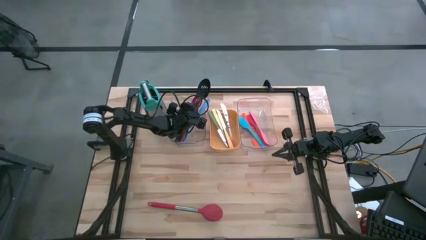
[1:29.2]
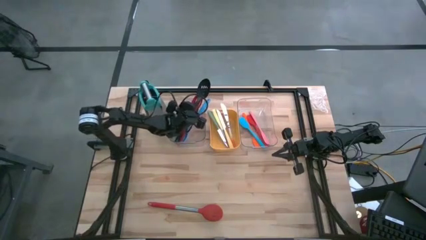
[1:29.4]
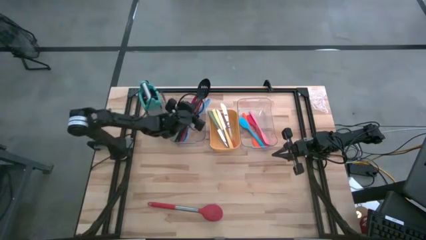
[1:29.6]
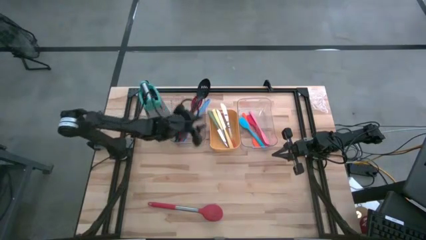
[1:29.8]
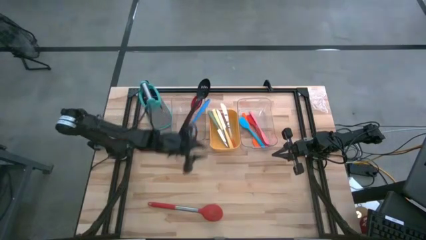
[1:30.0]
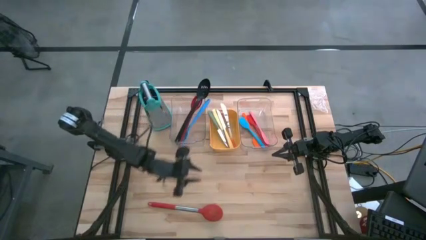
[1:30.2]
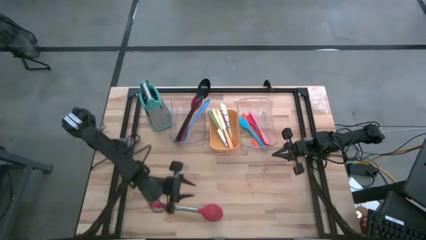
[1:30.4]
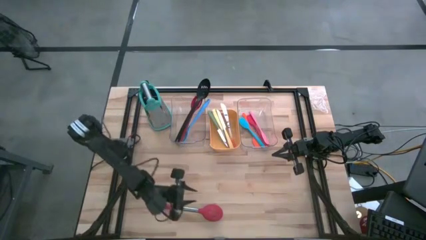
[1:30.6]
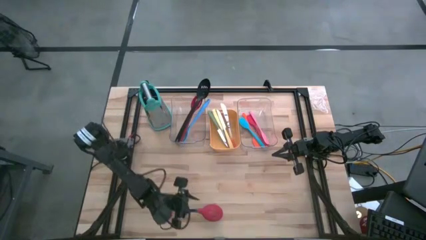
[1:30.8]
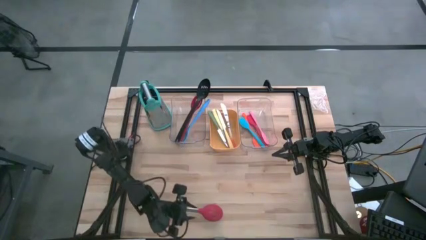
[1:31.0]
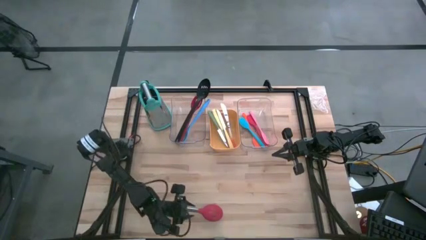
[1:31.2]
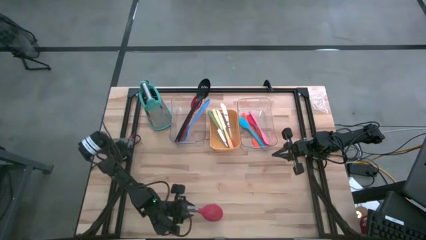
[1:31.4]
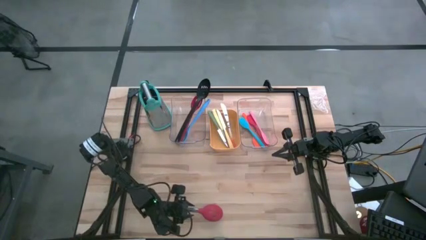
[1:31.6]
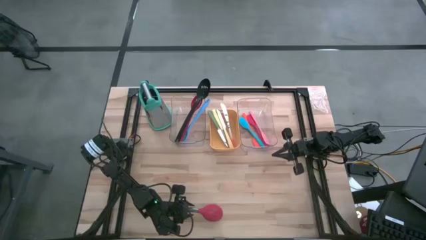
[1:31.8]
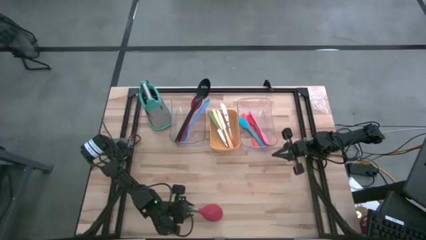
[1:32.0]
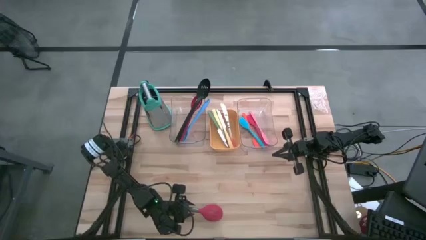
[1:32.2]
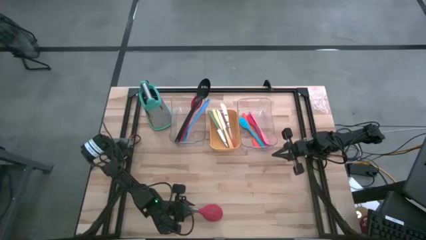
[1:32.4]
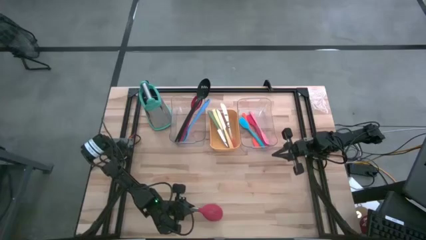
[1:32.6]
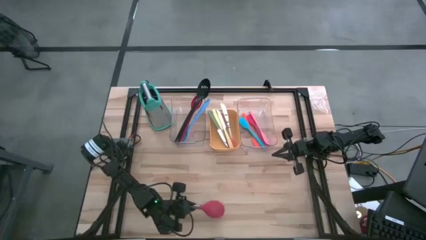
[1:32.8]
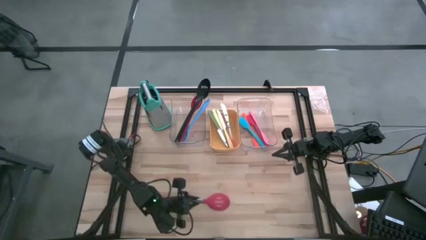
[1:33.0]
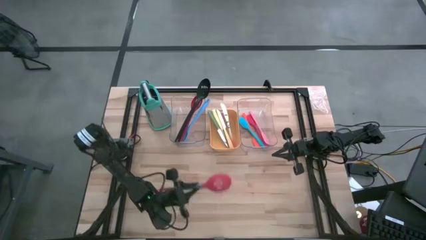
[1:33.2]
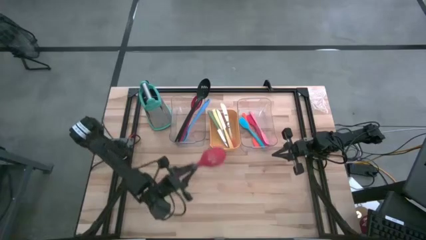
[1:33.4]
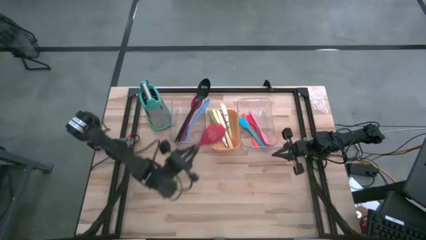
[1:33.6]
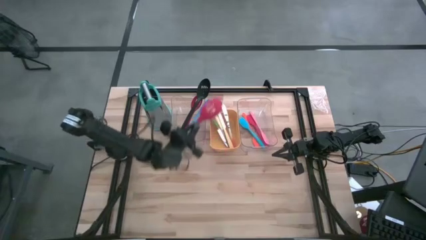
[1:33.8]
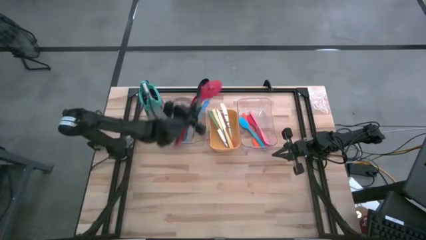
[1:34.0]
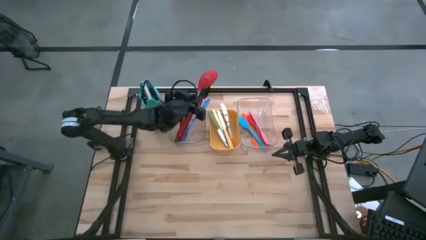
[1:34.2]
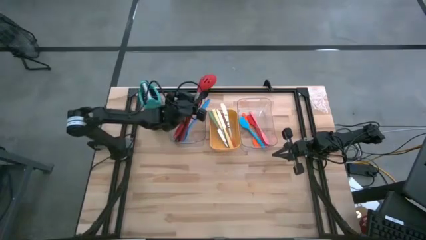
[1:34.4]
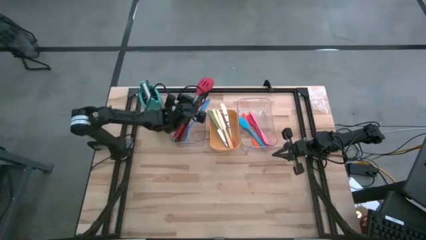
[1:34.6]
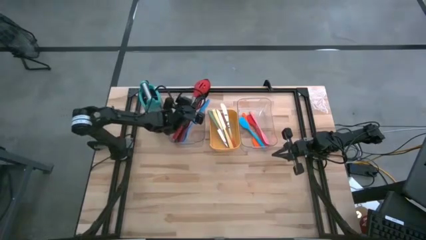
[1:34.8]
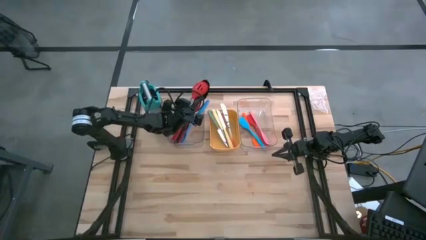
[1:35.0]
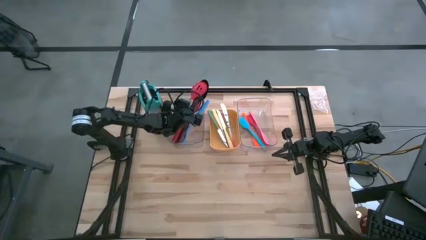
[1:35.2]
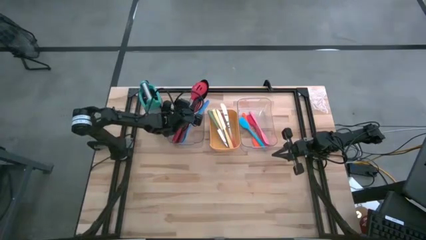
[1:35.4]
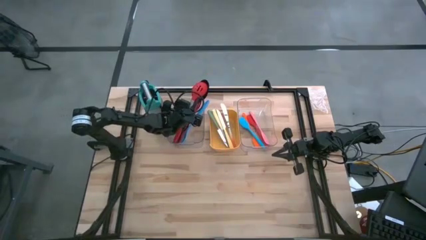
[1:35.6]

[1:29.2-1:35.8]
Task: Pick & Place Kitchen Items
Put the red serving spoon into the left transparent bin

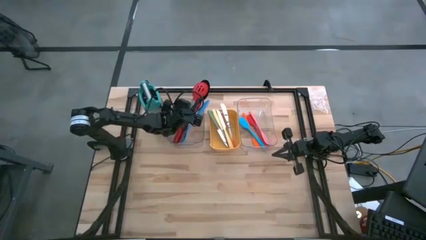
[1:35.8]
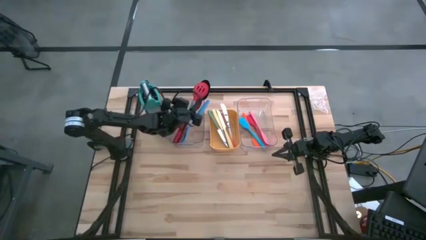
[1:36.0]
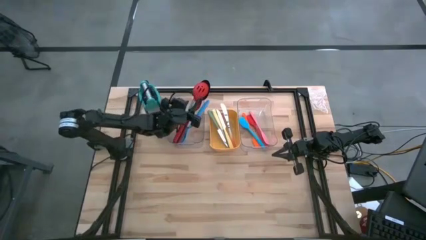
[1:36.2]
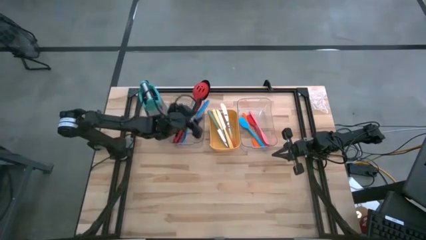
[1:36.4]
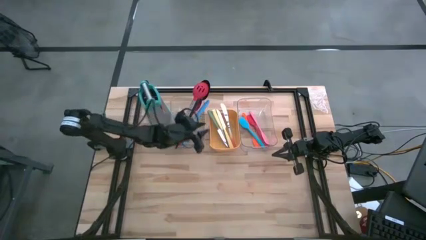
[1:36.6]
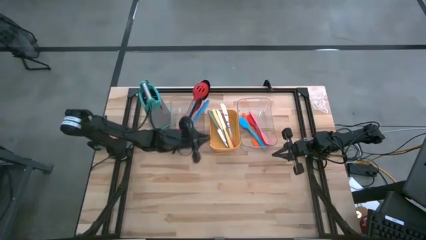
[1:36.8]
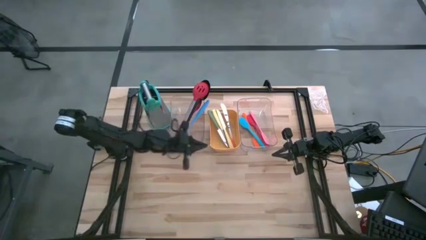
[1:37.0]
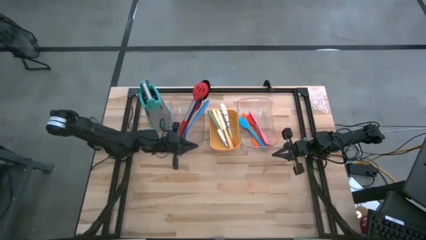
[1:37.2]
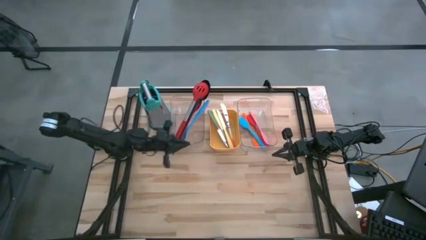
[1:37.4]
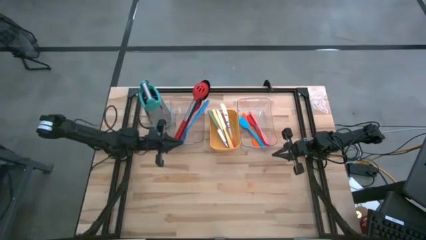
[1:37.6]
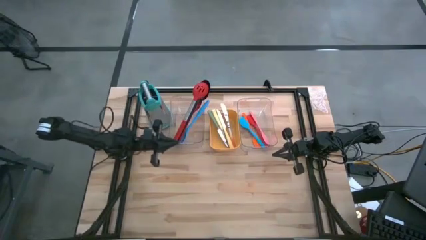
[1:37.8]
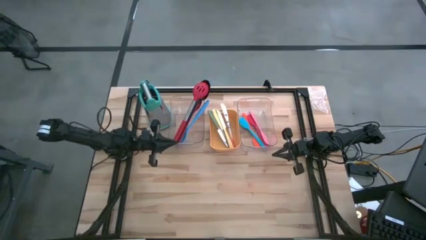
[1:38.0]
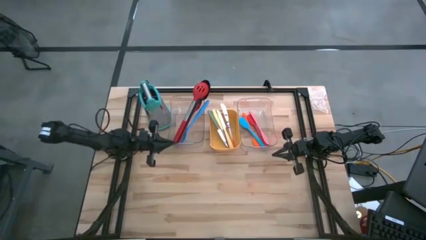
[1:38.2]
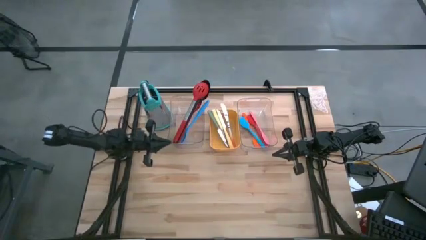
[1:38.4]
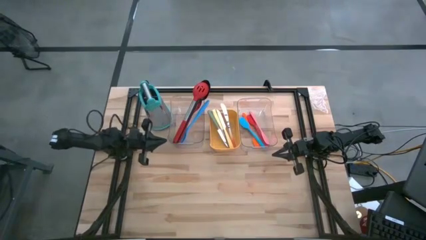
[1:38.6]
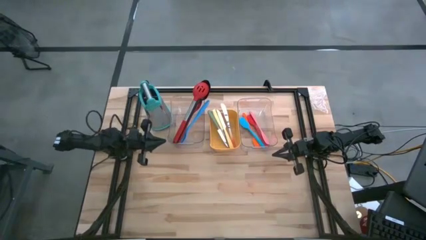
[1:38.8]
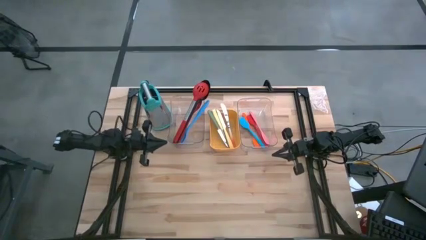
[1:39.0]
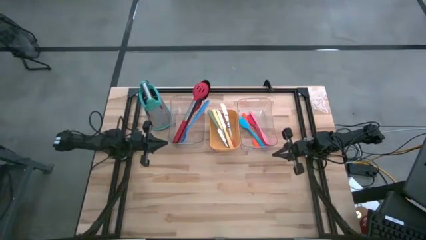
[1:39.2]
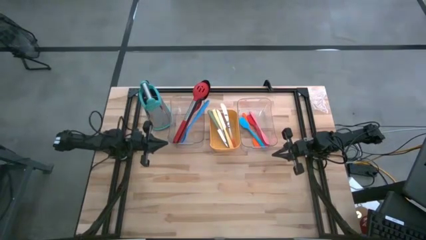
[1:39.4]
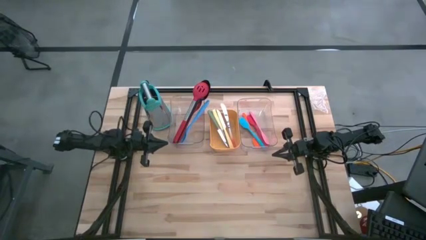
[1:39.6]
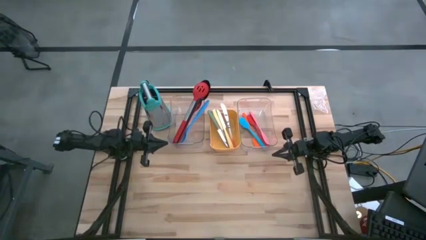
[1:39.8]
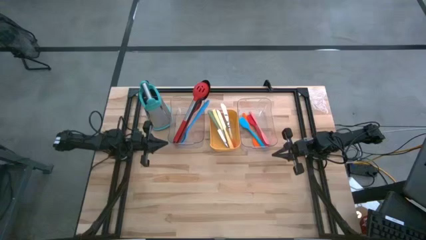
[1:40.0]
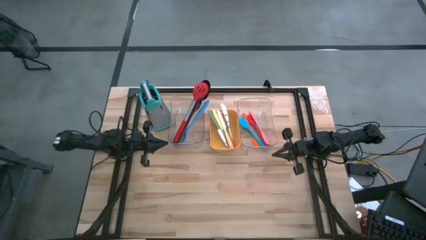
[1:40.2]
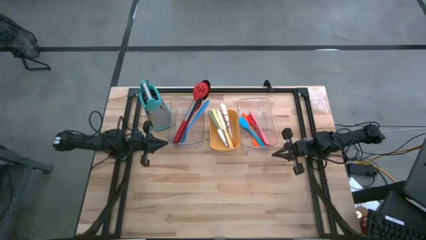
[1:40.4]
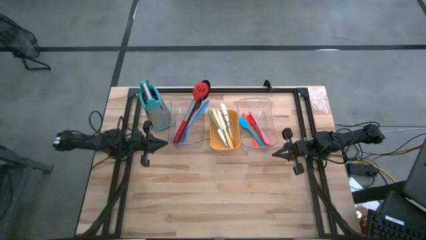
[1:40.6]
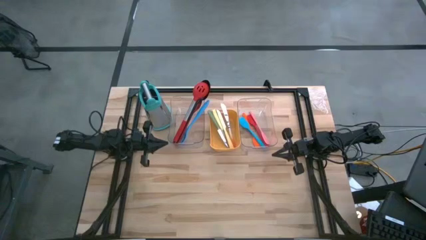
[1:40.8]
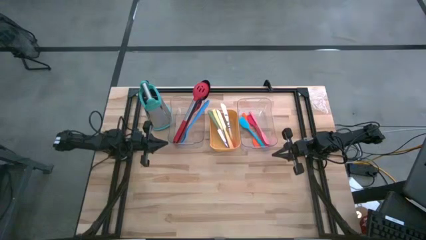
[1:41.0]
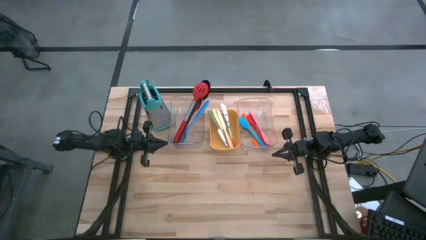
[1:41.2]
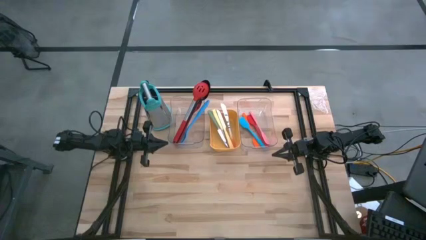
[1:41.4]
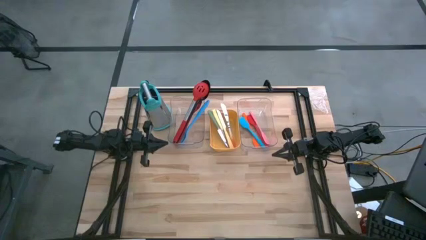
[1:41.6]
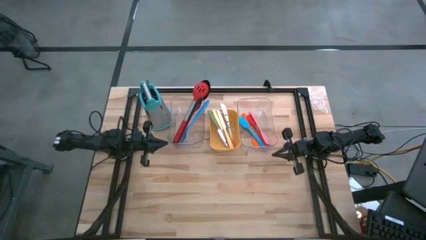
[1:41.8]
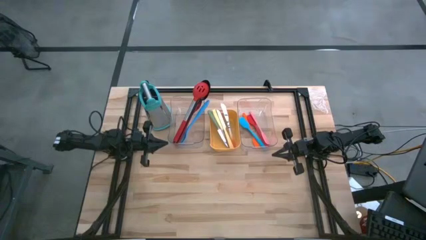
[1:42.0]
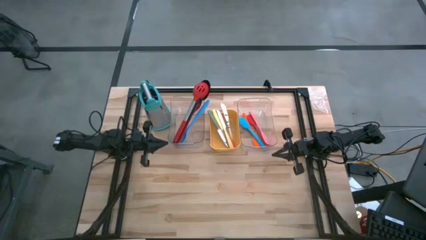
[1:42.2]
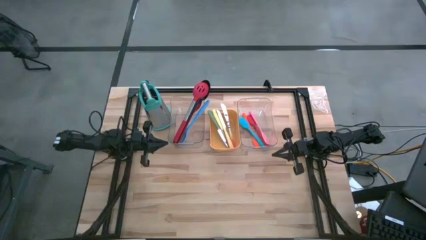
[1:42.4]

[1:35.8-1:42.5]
Return to Home Position

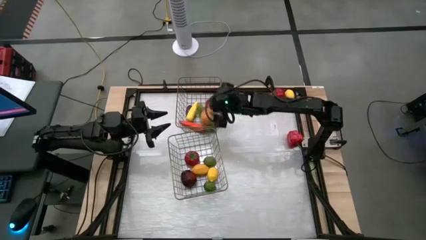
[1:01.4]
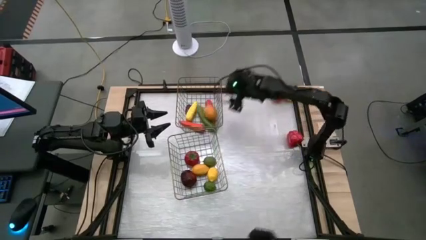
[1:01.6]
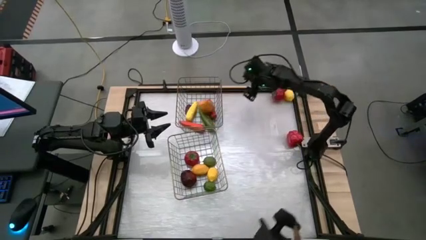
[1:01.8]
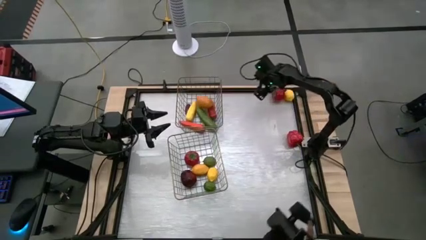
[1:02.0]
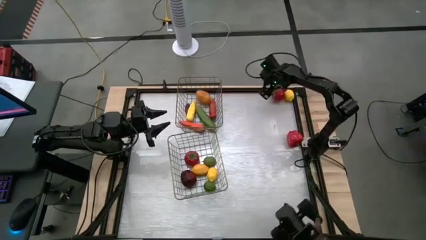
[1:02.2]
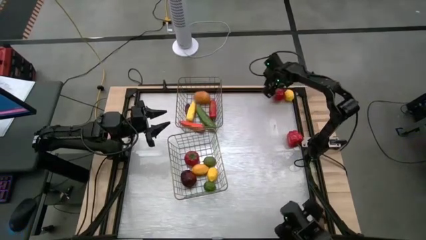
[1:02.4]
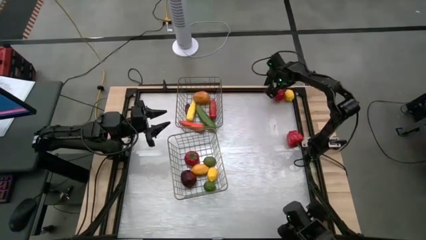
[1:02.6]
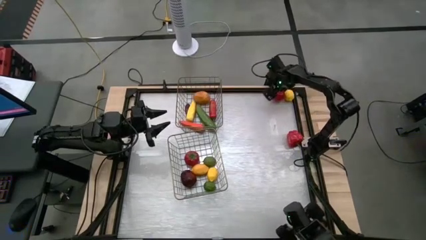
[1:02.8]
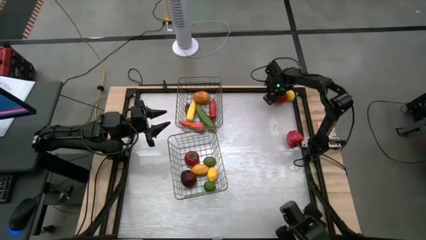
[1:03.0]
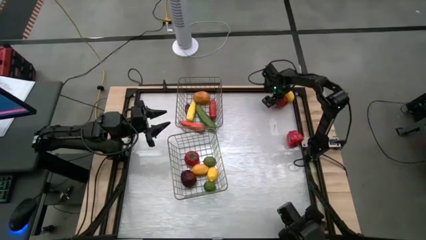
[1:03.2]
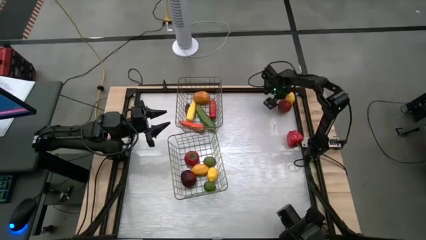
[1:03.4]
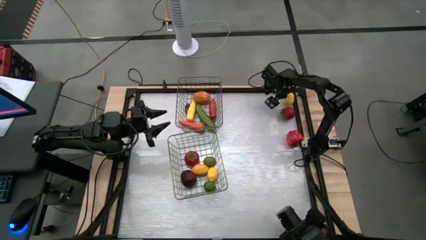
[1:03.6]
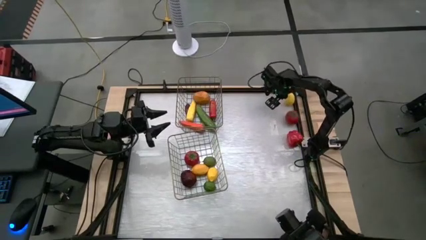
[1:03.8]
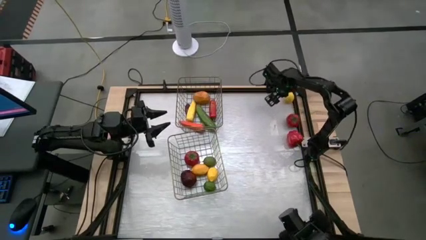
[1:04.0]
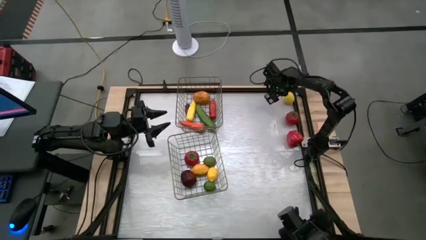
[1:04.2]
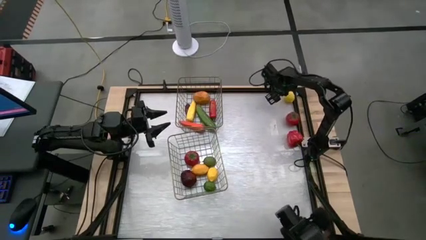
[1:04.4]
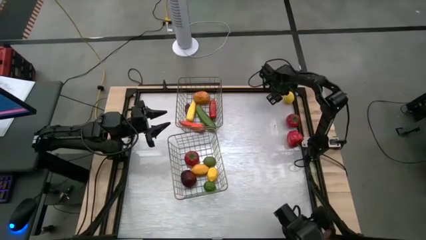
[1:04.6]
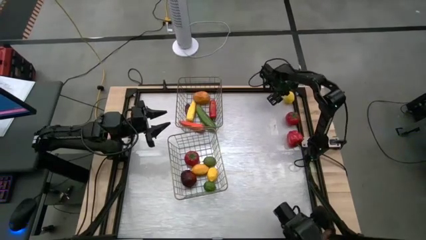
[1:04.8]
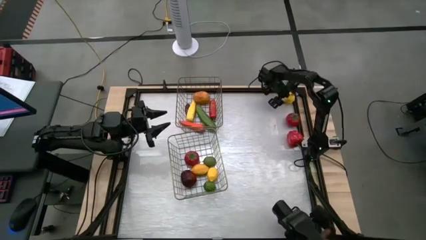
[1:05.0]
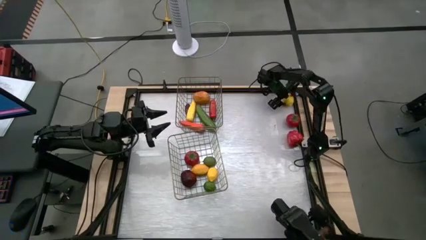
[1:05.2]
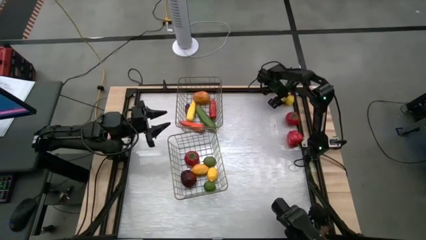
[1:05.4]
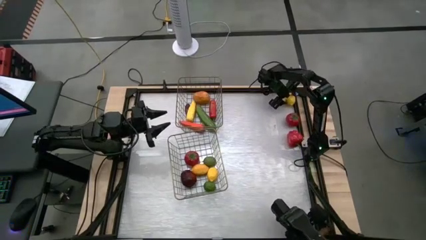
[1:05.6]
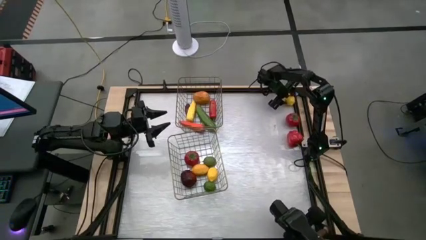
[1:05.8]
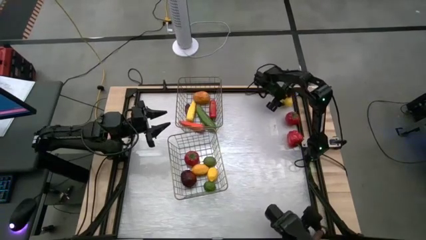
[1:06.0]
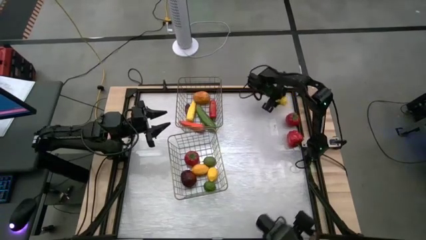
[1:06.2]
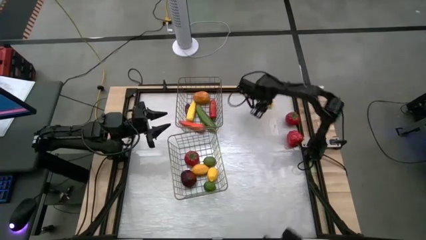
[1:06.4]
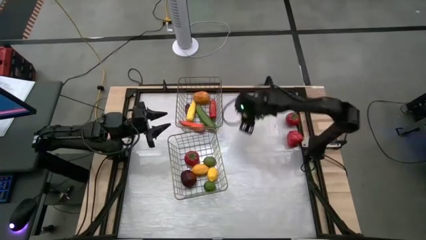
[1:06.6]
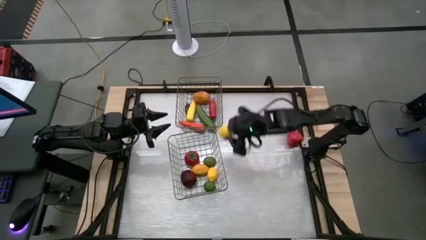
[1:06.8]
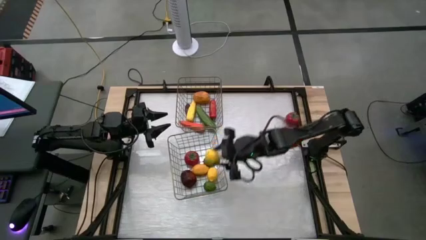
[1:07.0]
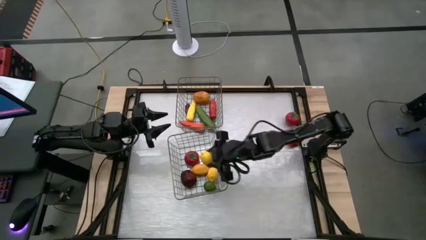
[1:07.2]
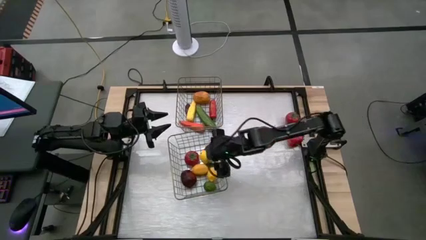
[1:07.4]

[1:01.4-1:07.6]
Task: Sort produce into baskets
Put the yellow lemon into the bottom basket
